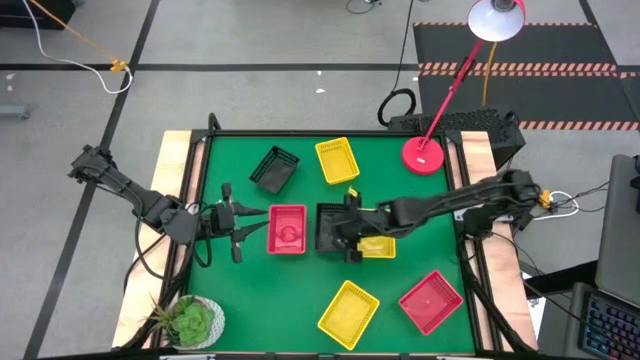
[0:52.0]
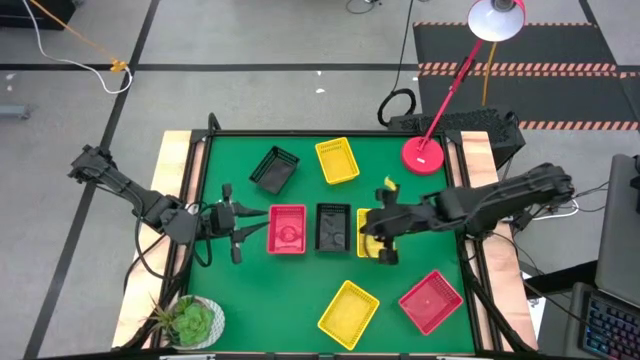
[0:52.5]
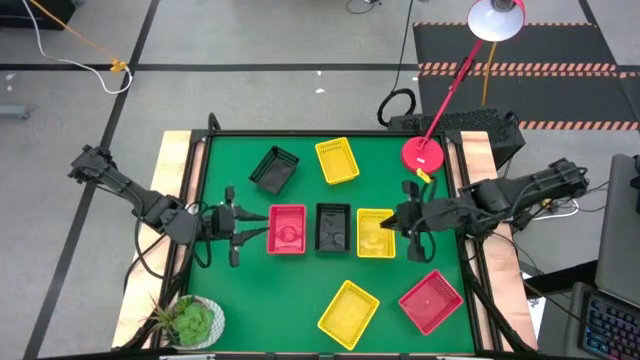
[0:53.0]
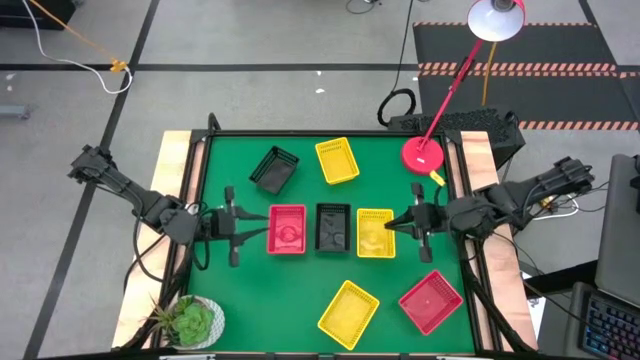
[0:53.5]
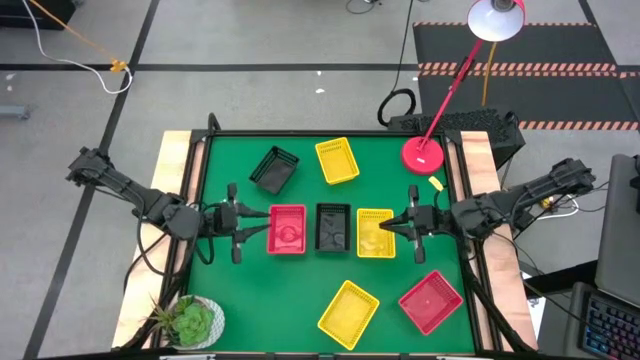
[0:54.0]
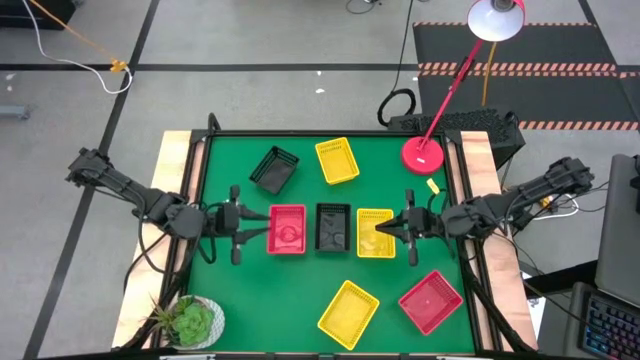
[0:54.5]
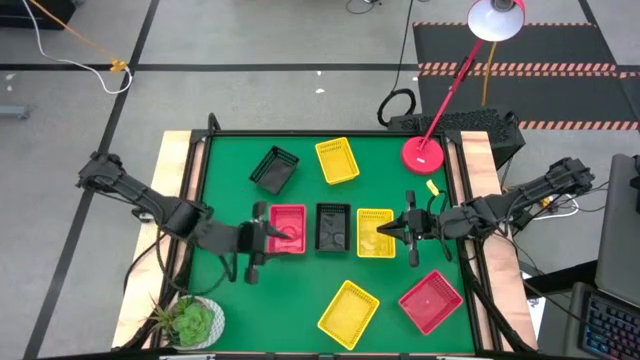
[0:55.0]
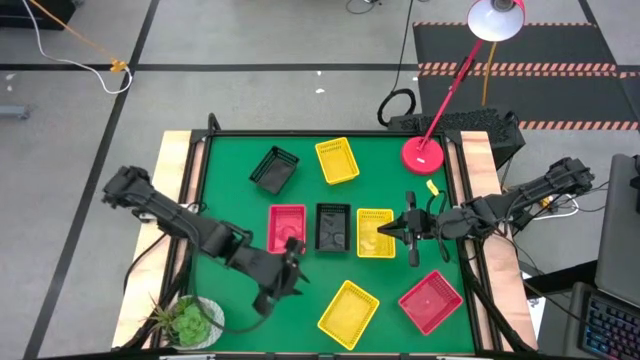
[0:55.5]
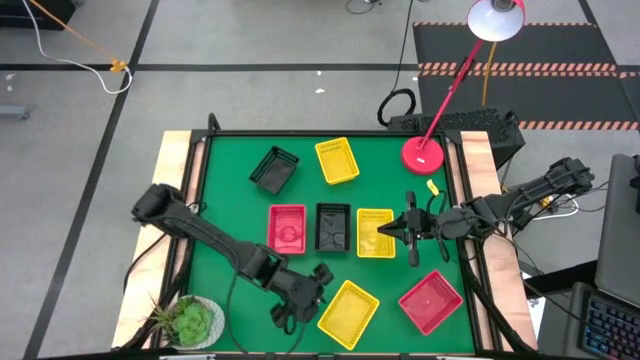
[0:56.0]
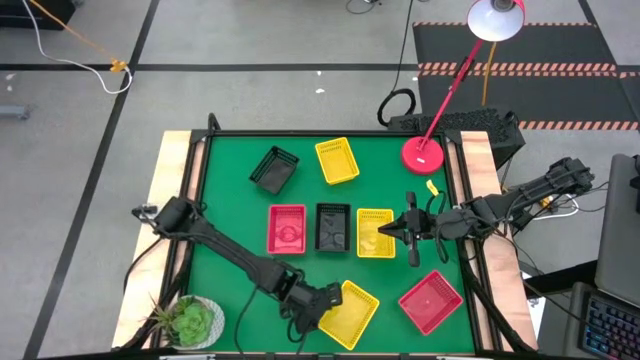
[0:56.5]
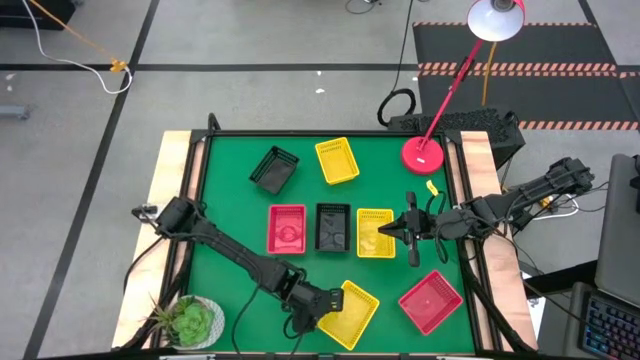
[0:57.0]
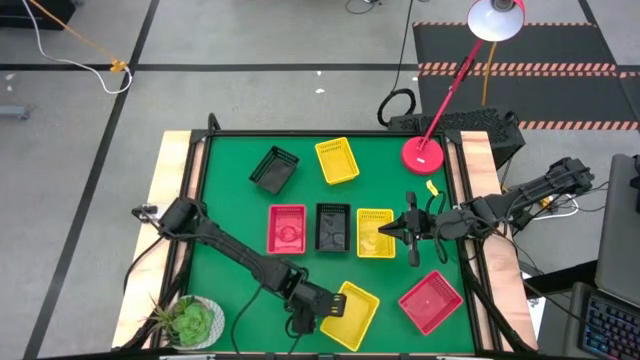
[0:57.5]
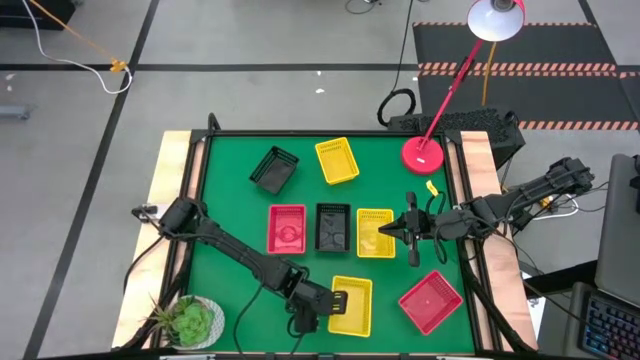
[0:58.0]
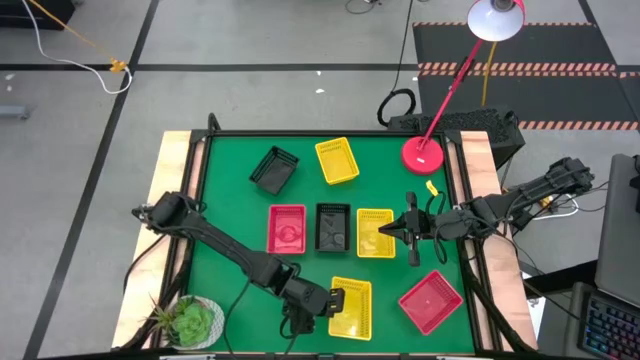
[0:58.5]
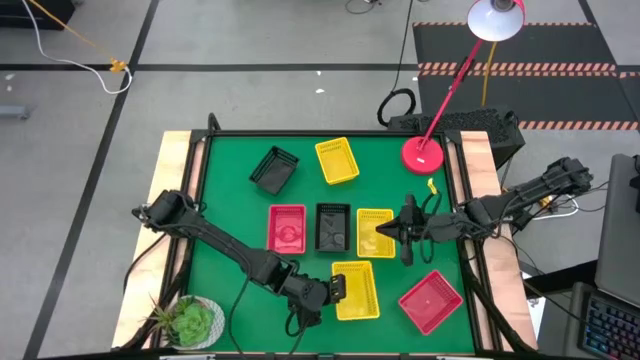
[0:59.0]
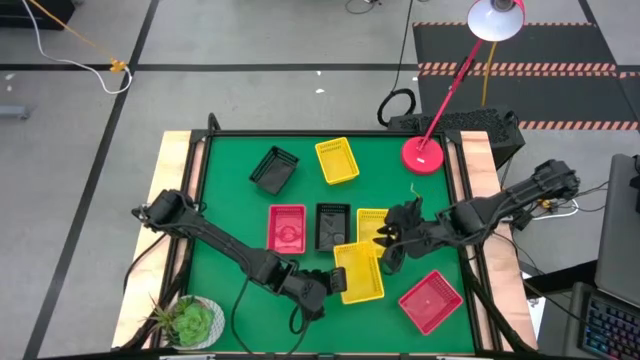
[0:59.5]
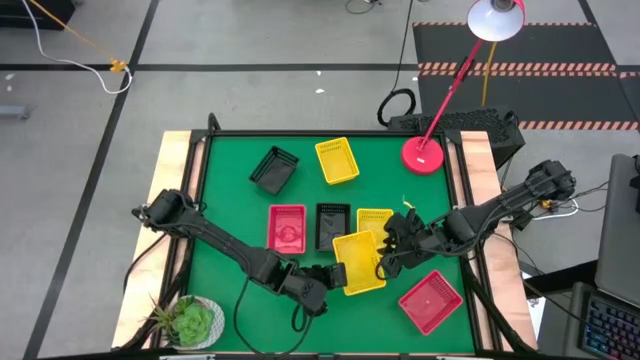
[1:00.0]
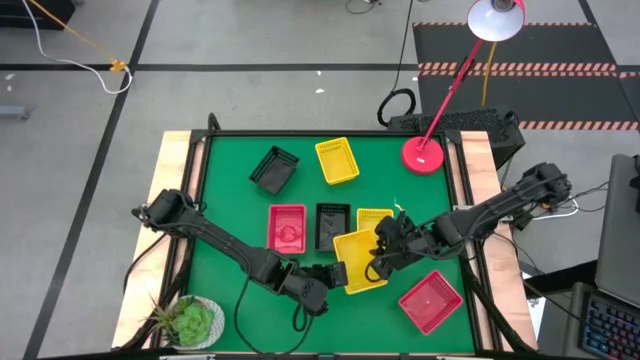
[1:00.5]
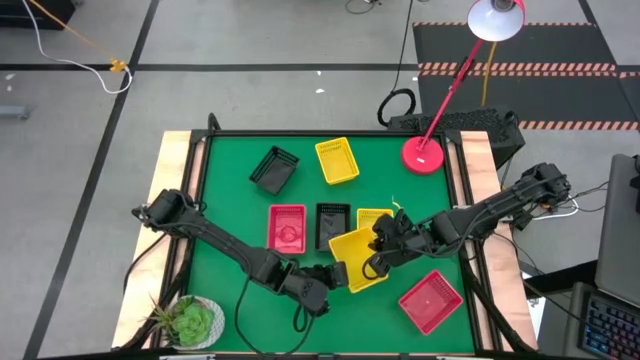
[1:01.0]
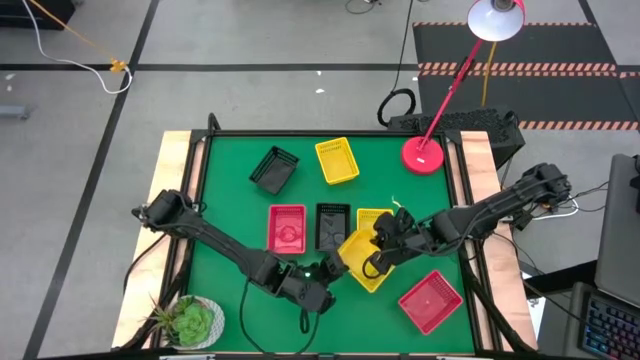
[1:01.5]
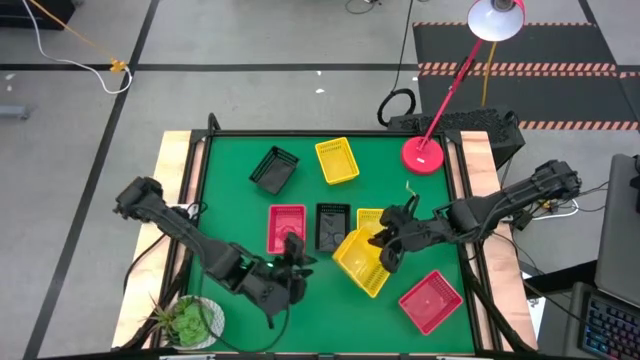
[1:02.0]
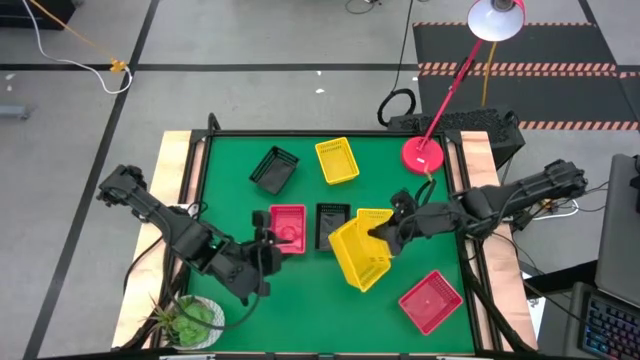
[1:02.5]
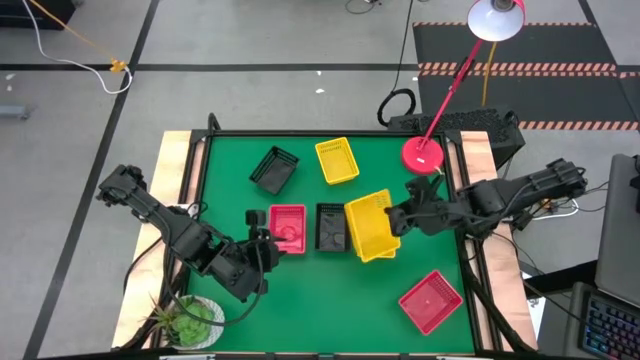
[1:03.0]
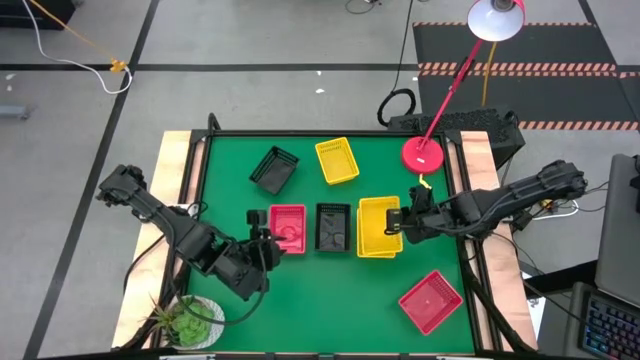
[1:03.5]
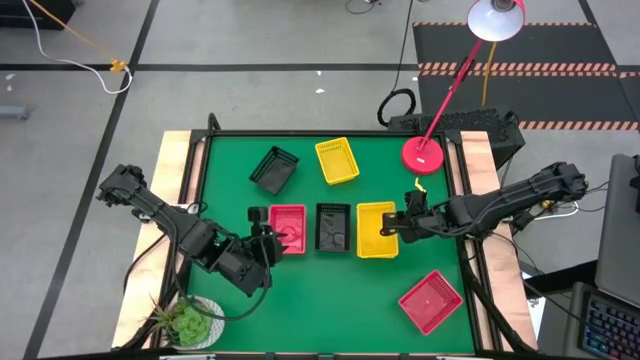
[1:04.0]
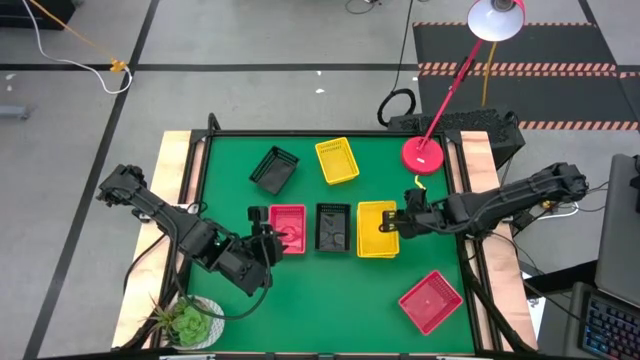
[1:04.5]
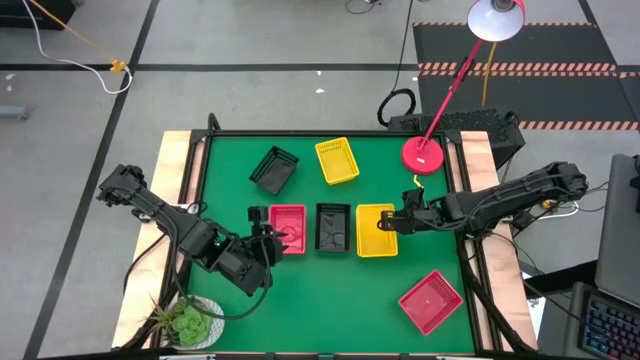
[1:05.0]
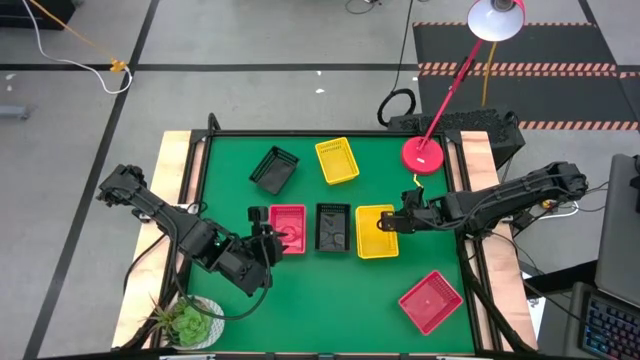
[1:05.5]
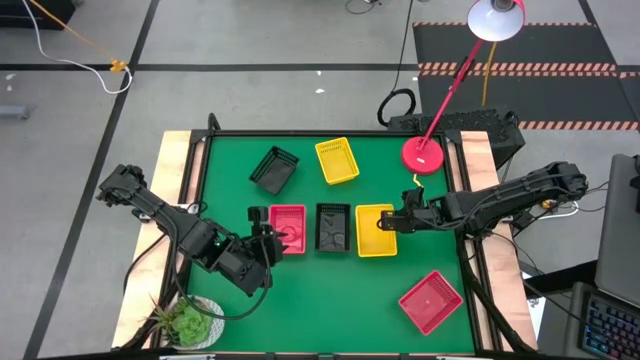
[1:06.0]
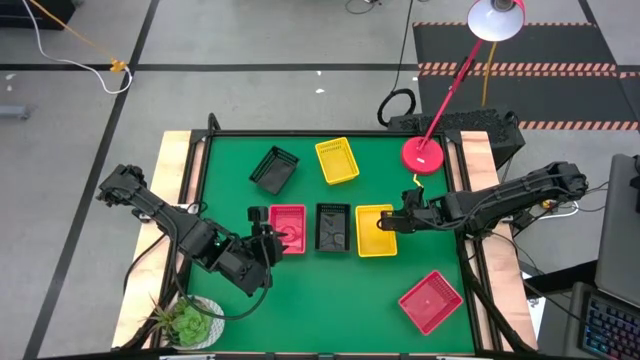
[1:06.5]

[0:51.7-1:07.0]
Stack the bottom yellow bin on top of the middle yellow bin
